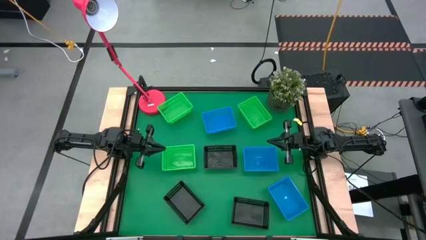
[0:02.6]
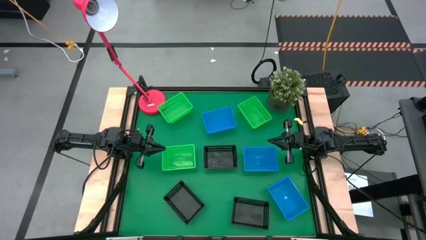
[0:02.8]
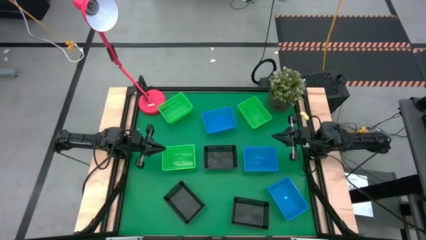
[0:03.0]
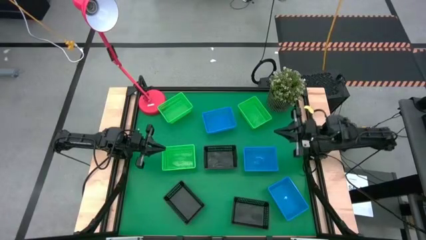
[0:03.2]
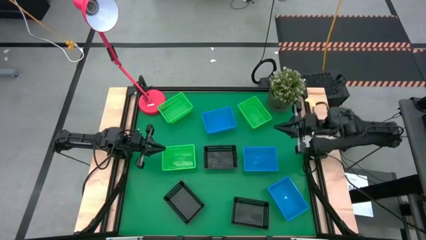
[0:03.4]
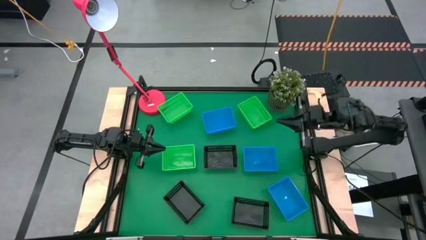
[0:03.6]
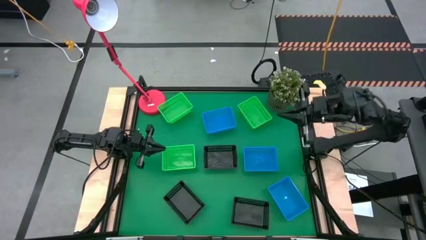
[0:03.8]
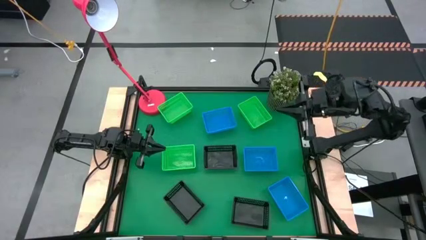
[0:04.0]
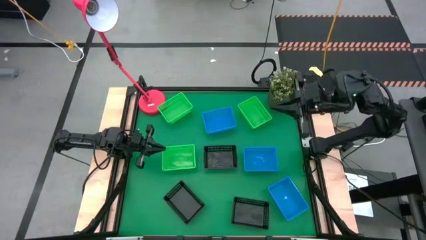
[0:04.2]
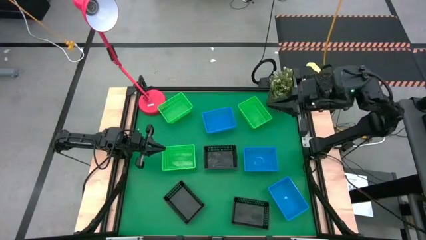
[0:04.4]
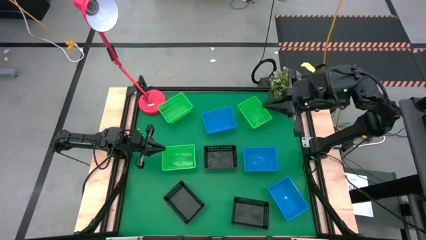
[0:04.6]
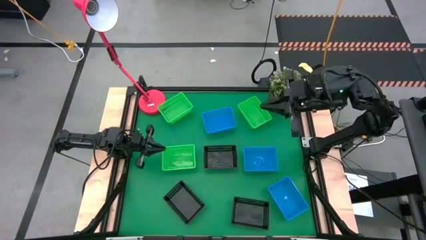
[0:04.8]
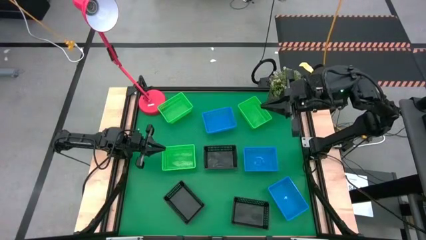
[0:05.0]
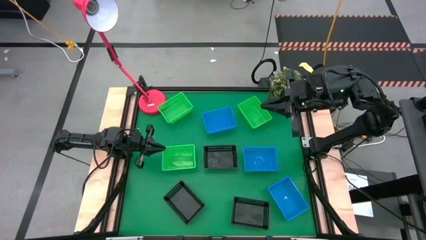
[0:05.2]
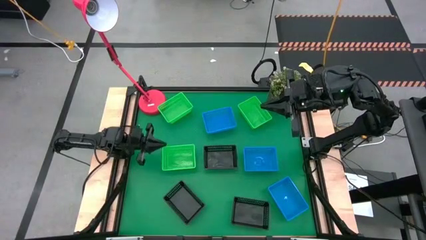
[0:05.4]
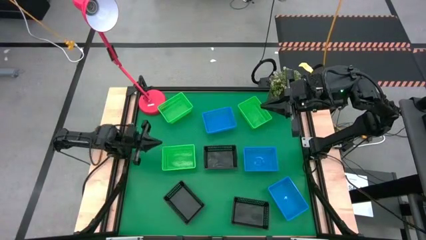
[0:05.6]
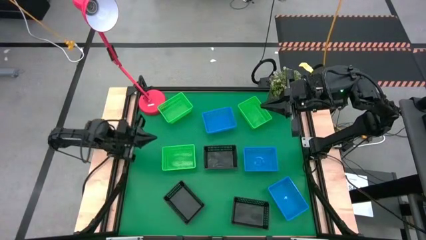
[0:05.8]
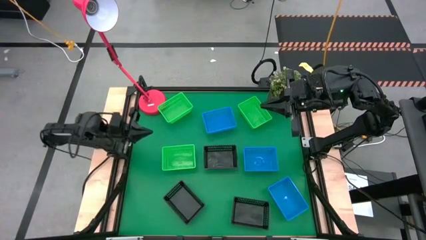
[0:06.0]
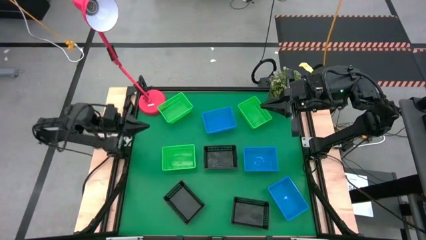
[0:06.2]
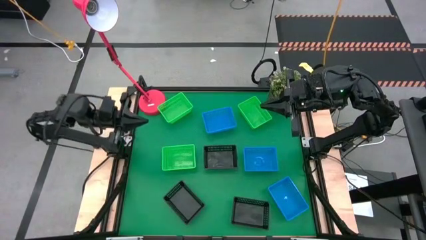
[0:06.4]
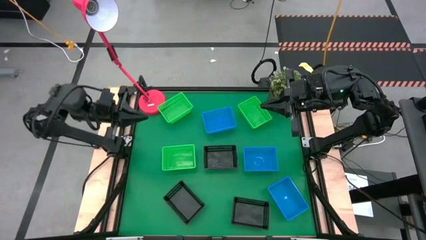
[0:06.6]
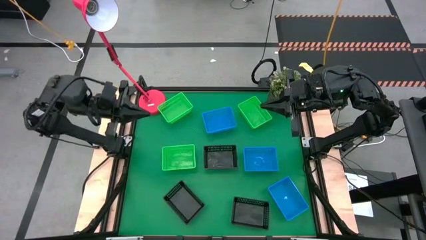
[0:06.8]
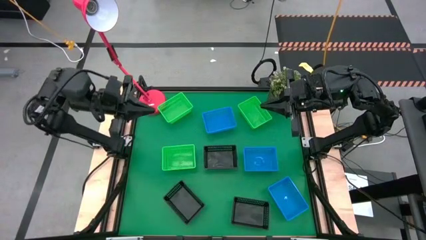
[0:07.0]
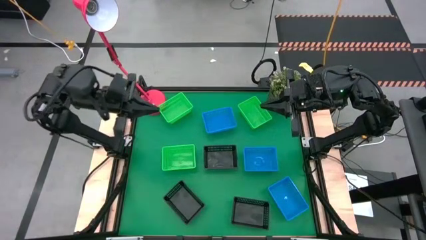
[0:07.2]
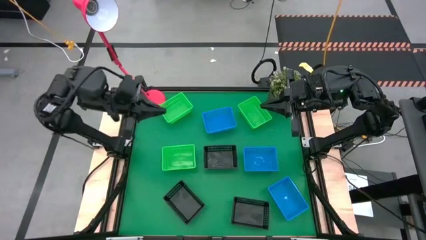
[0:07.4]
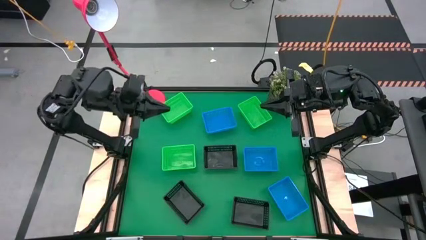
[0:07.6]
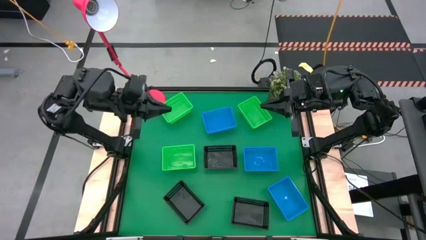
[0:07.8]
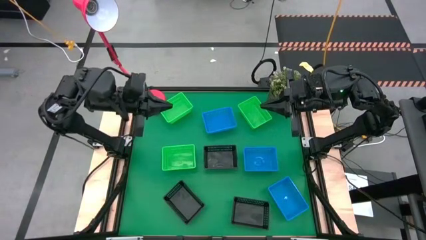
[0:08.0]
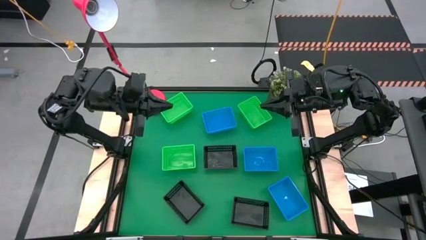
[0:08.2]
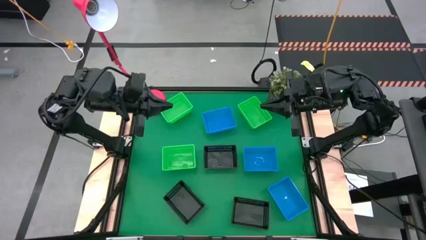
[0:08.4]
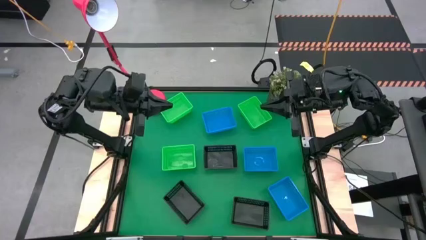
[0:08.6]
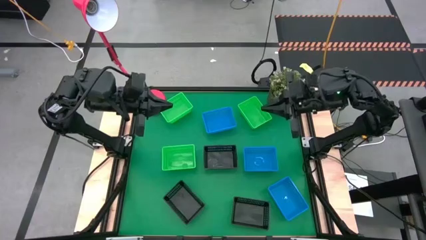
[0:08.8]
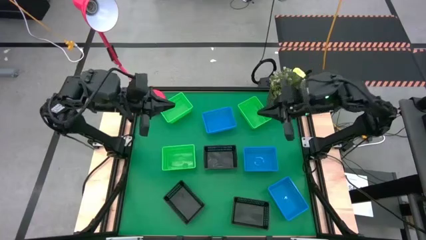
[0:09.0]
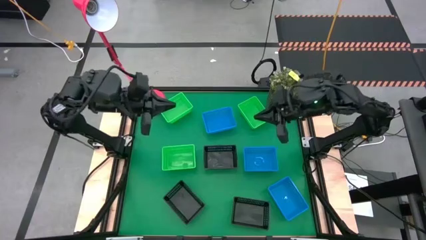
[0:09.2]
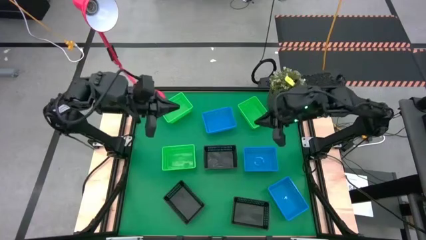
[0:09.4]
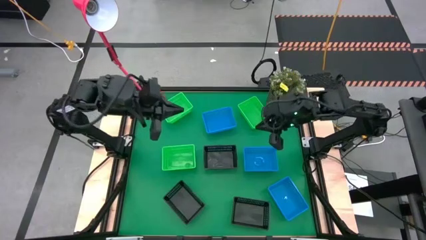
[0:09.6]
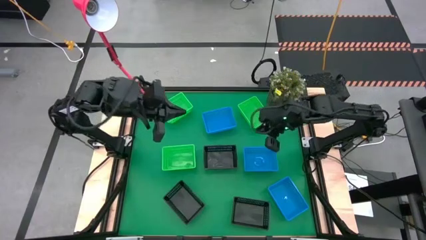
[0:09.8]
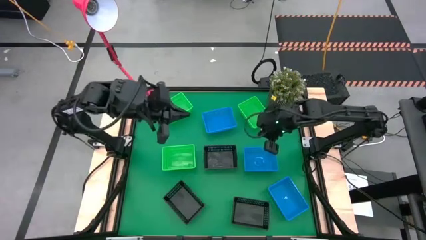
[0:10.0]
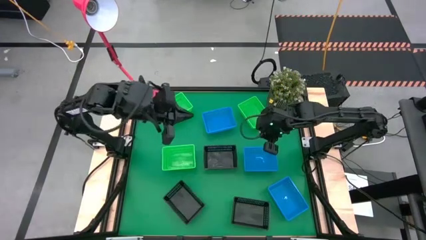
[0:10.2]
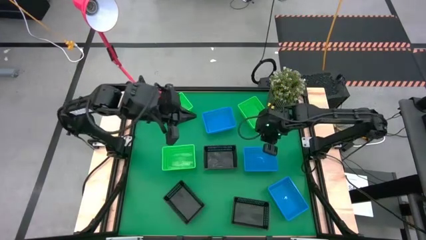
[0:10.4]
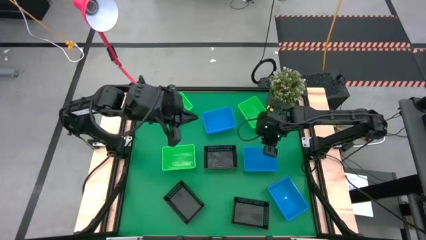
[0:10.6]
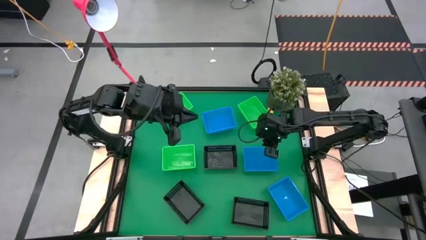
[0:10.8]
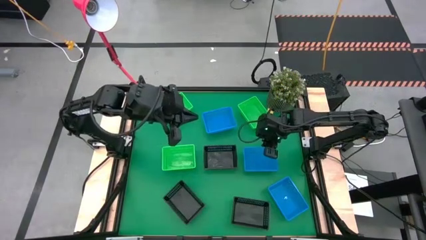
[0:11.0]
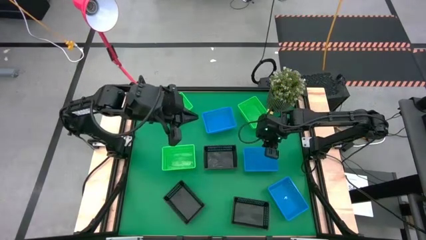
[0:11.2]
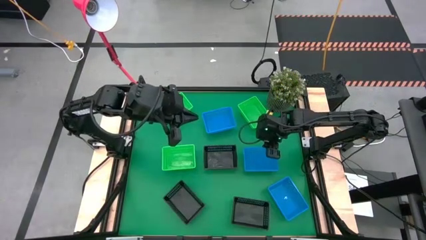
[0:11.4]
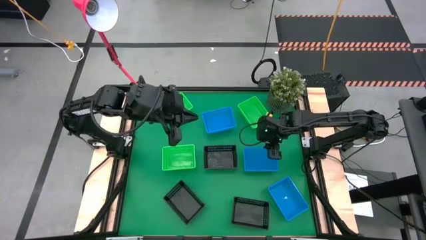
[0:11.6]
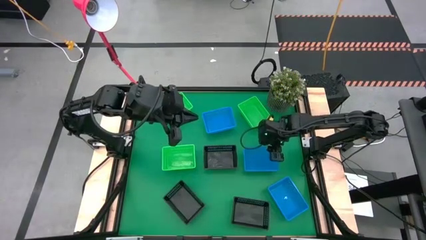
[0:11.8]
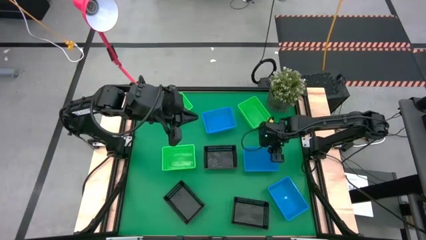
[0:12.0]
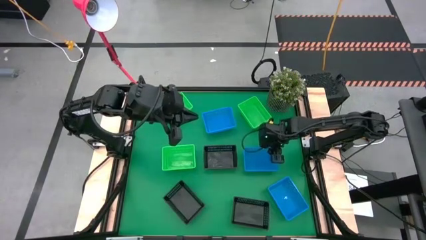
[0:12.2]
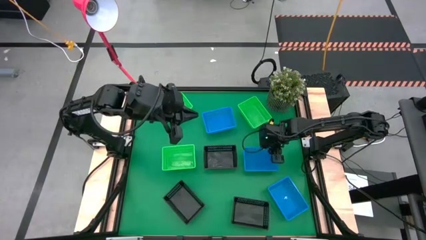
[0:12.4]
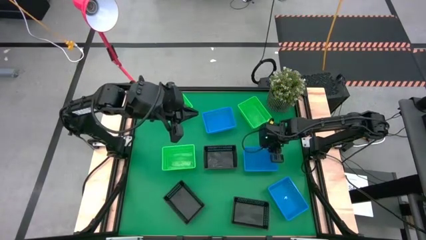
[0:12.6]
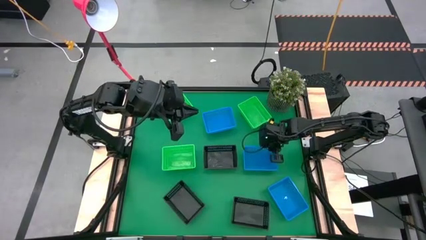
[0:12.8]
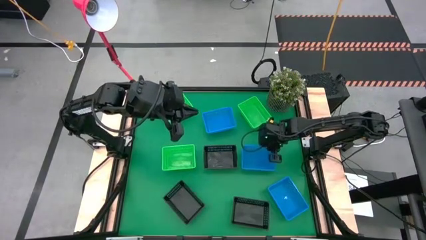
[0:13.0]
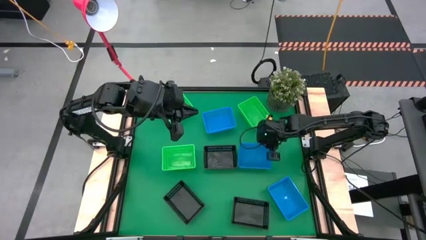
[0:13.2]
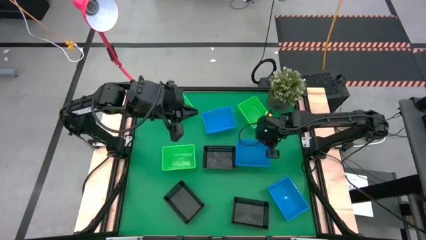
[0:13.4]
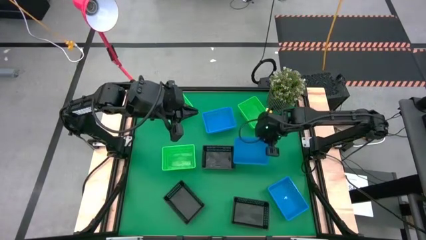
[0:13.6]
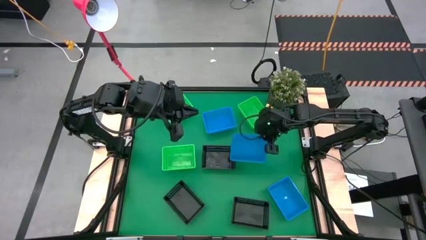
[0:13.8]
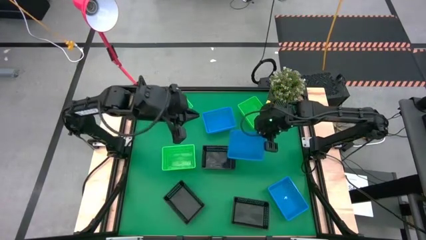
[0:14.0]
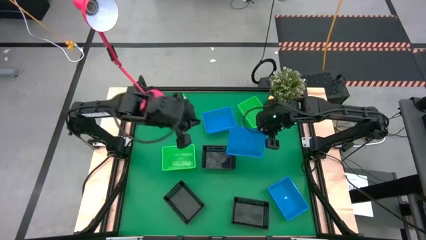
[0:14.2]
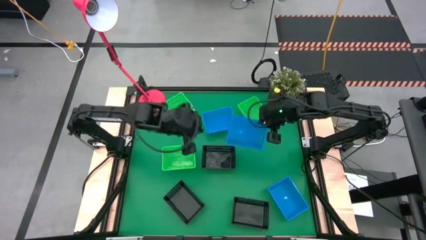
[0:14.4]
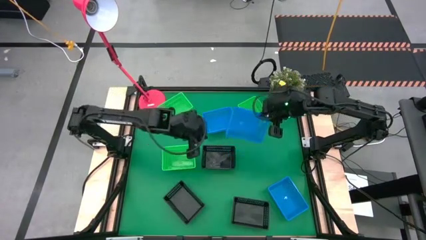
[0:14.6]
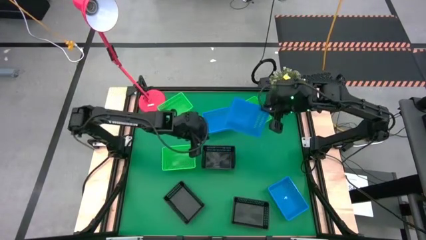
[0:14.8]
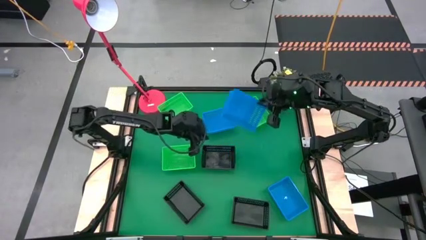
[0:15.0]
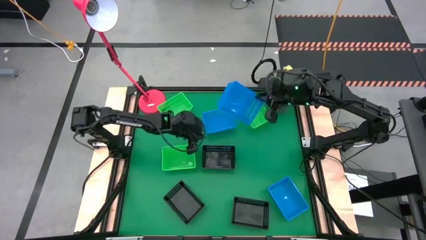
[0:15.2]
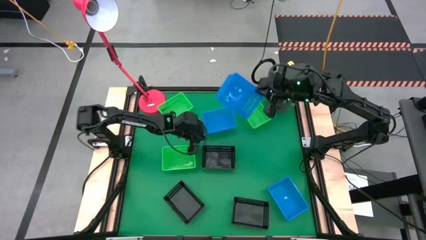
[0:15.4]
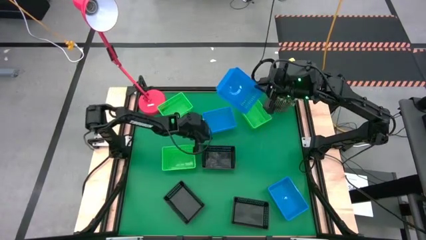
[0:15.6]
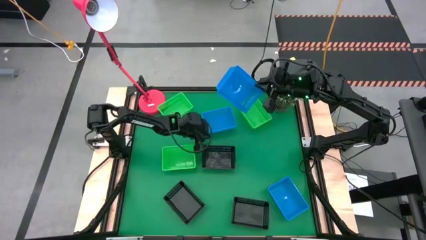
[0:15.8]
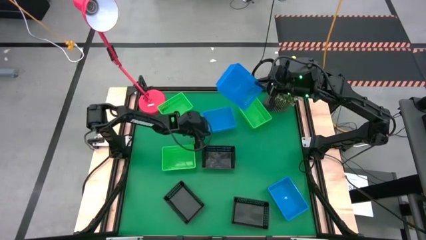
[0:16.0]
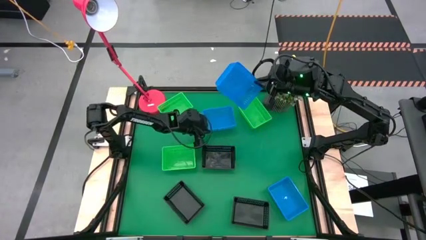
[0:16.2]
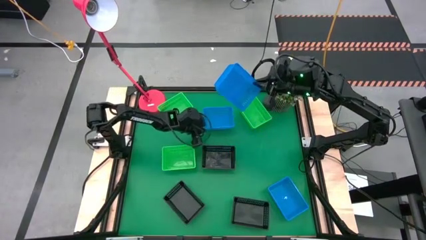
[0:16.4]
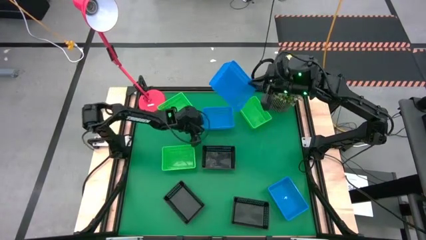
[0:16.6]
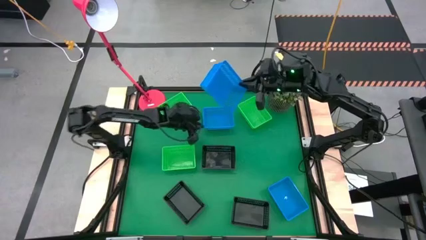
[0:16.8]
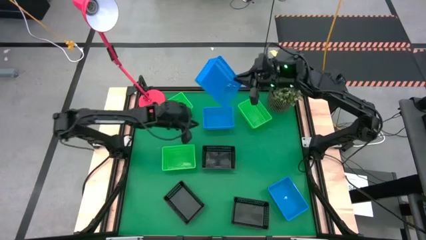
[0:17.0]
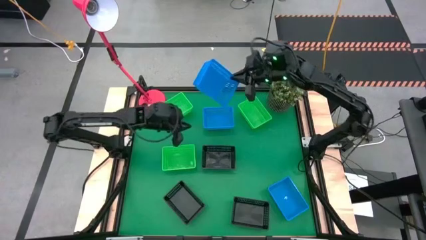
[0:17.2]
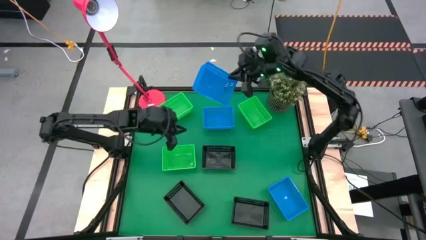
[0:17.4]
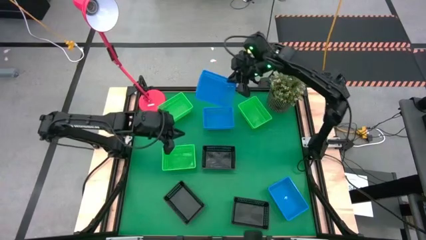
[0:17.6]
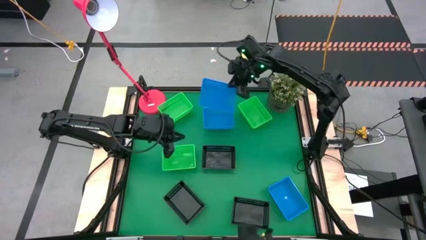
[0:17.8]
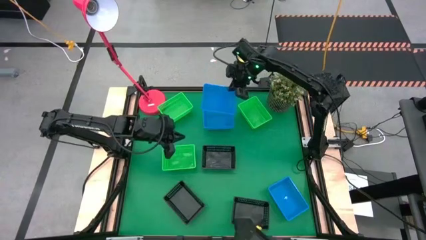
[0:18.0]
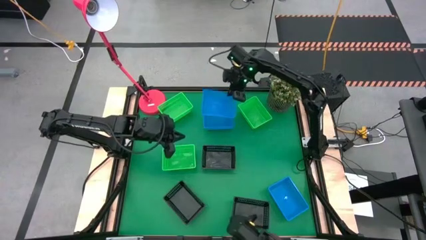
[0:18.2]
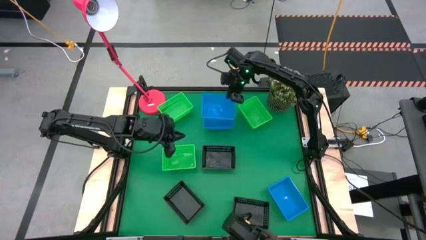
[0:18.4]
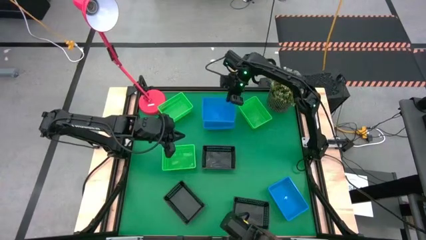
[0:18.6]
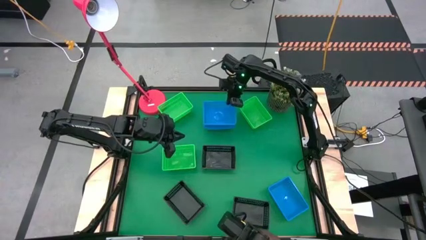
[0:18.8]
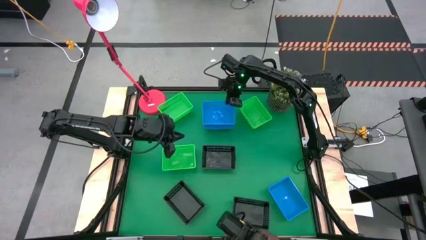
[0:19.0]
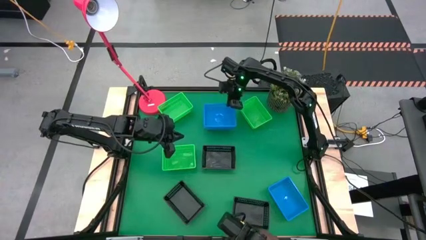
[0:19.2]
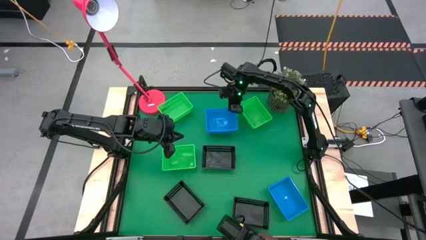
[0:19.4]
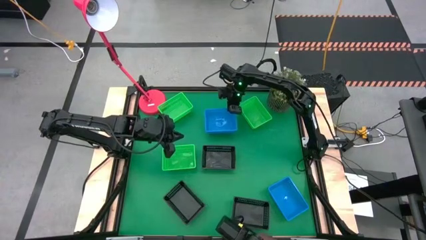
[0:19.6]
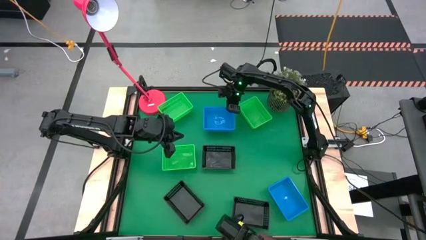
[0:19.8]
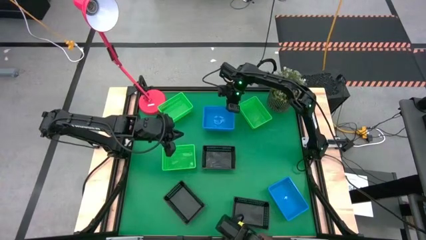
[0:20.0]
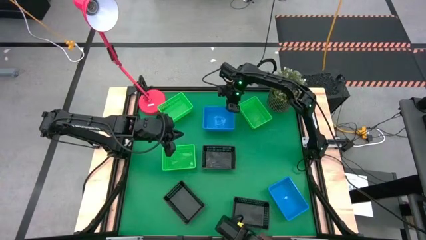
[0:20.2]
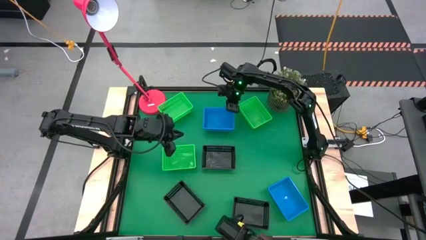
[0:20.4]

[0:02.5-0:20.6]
Stack the middle blue bin on the top of the top blue bin
